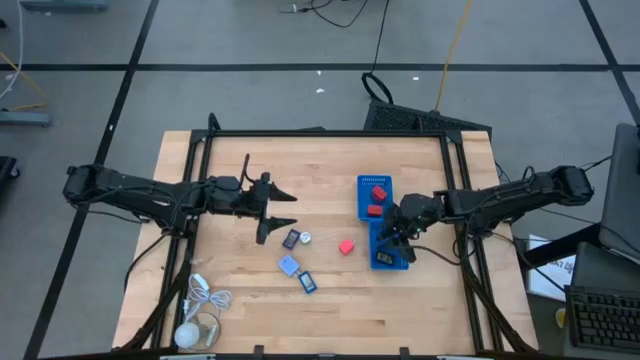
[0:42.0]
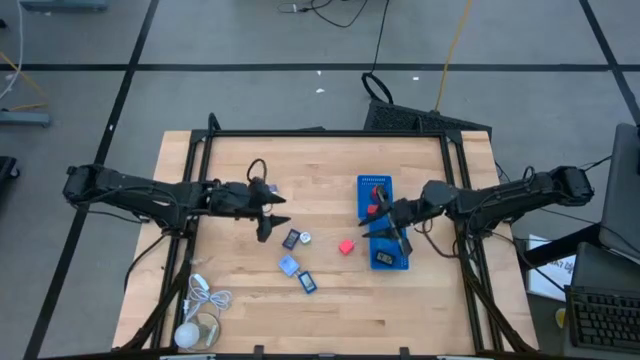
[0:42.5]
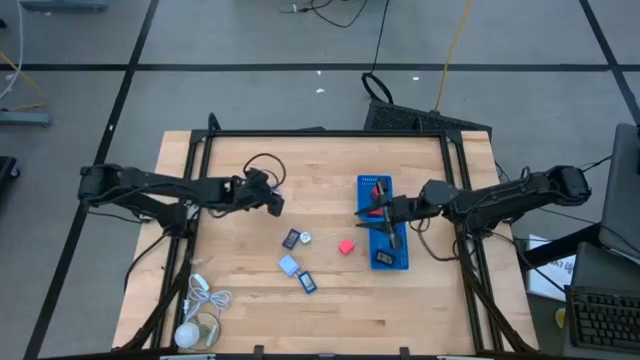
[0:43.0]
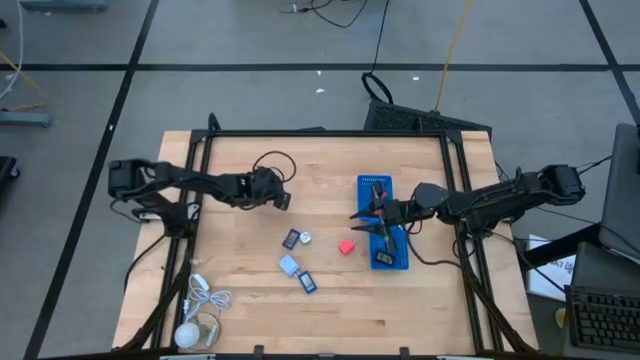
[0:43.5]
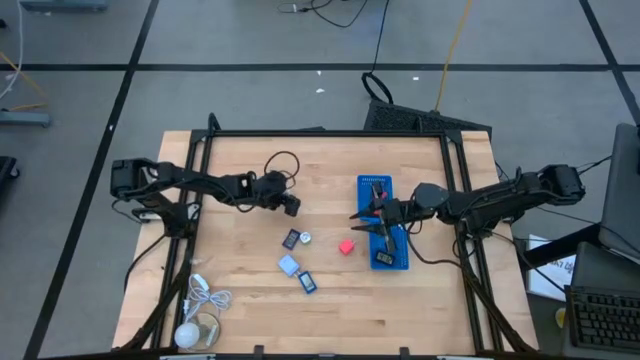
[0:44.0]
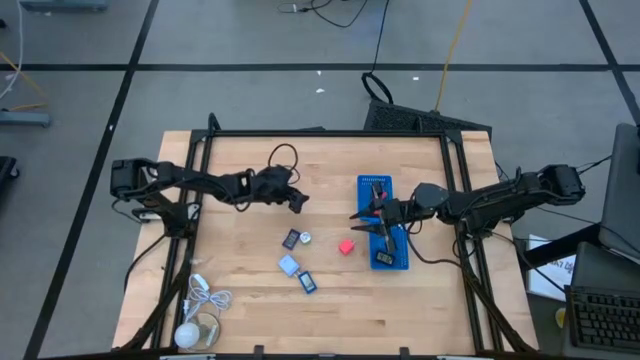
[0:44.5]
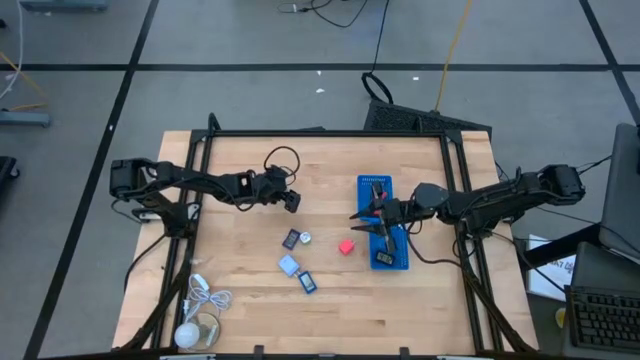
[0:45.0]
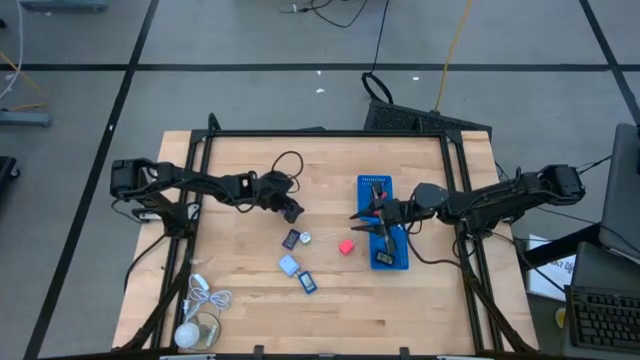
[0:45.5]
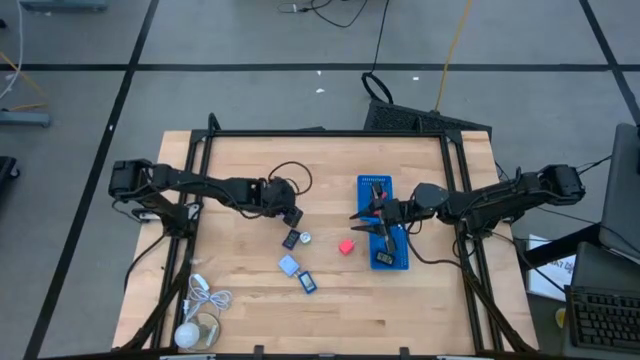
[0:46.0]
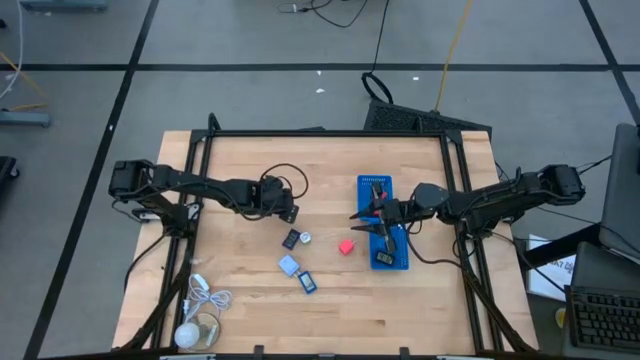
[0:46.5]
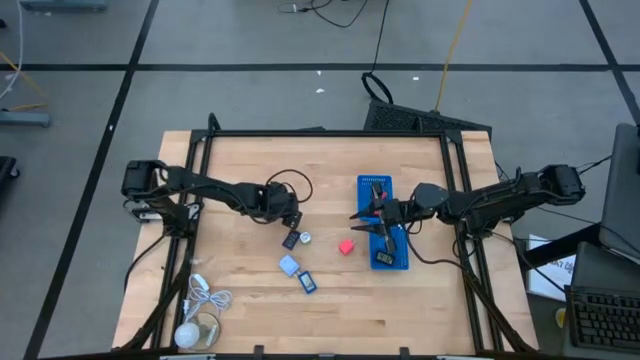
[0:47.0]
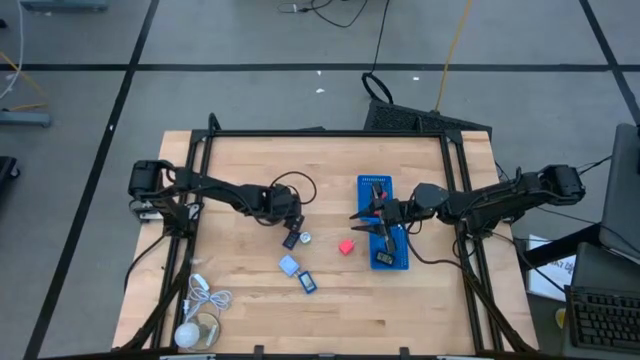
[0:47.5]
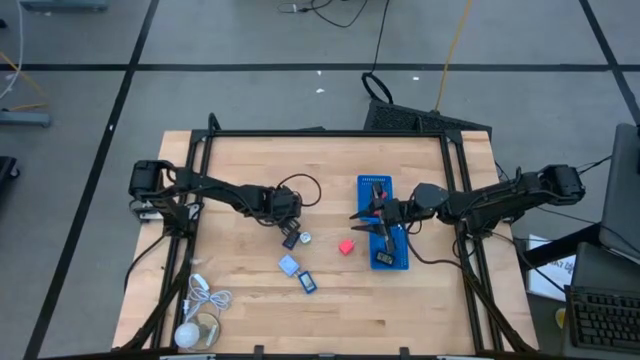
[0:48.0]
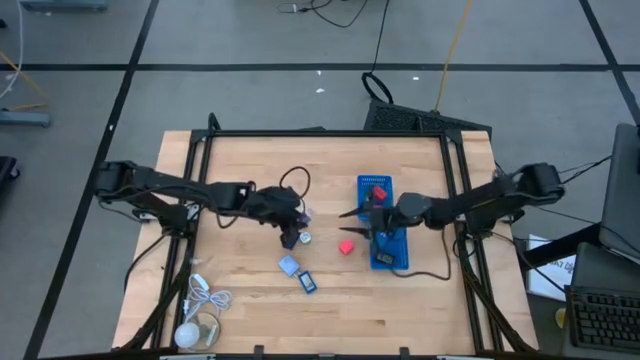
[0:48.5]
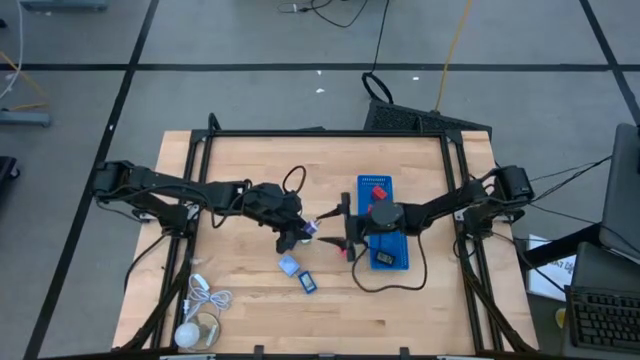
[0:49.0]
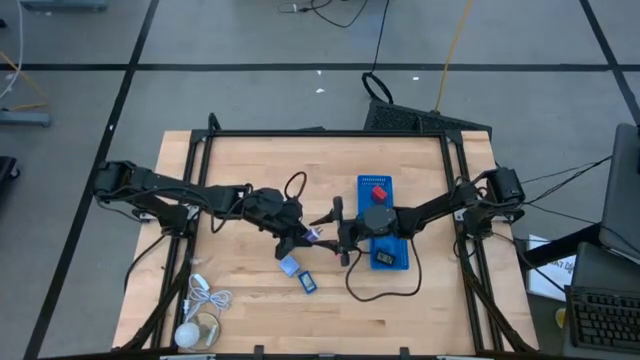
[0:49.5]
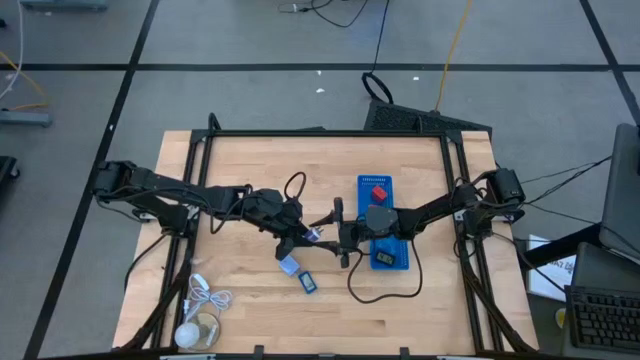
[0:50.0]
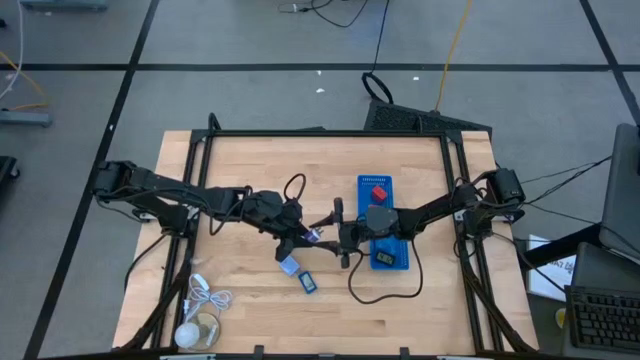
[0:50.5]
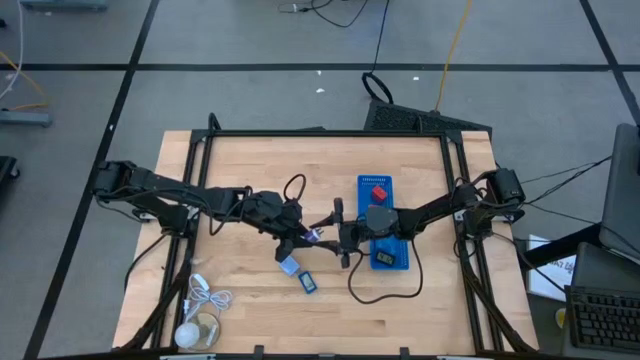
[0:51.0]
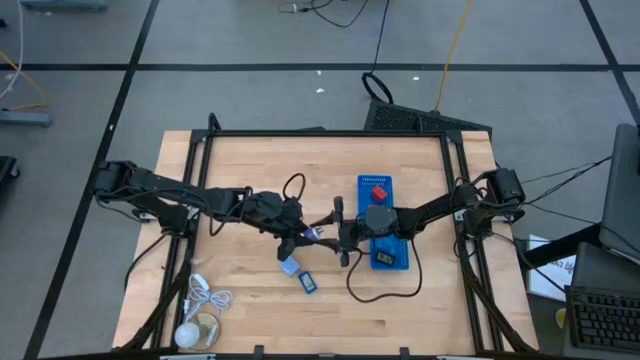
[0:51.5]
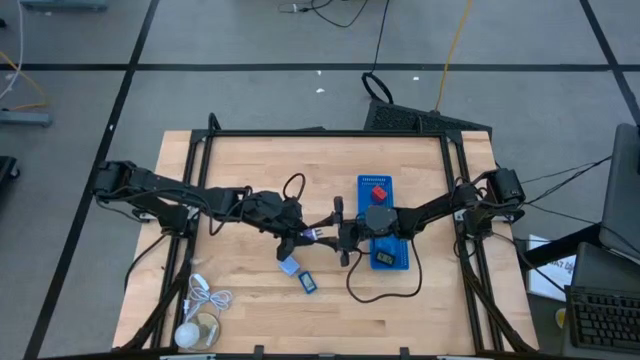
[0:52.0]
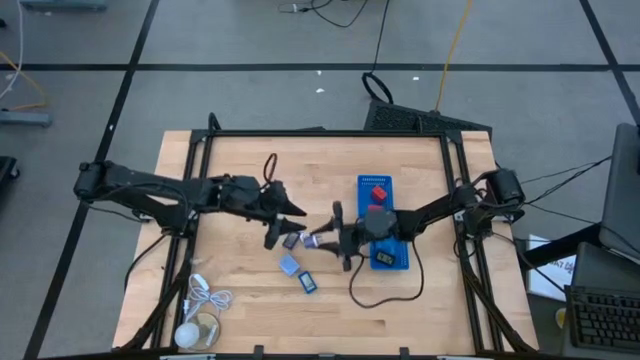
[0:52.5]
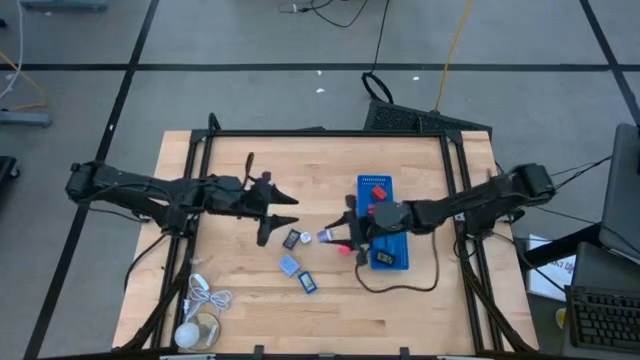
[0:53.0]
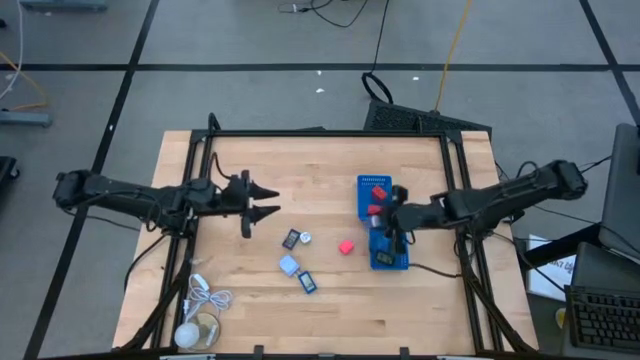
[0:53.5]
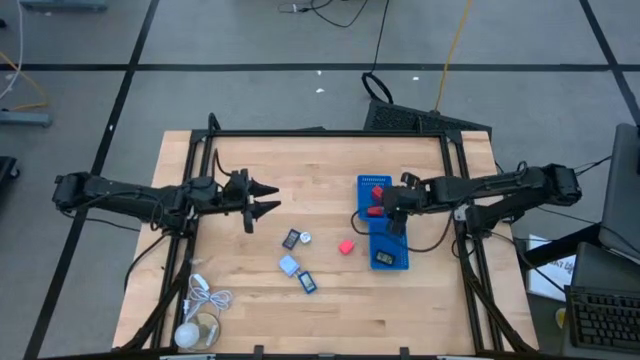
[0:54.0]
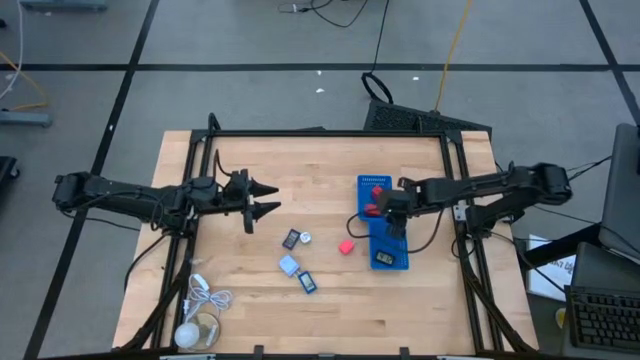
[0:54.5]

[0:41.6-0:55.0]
Task: Pick & Place Office items
Put the purple charger adapter into the top blue bin

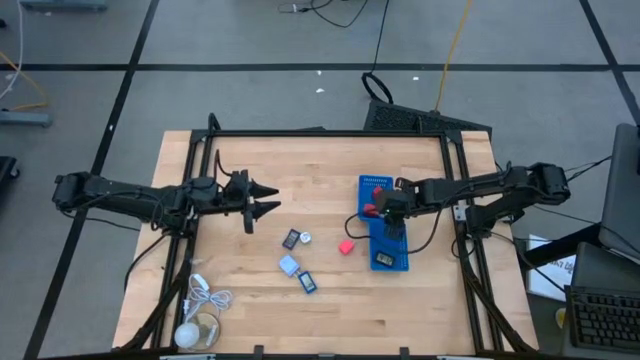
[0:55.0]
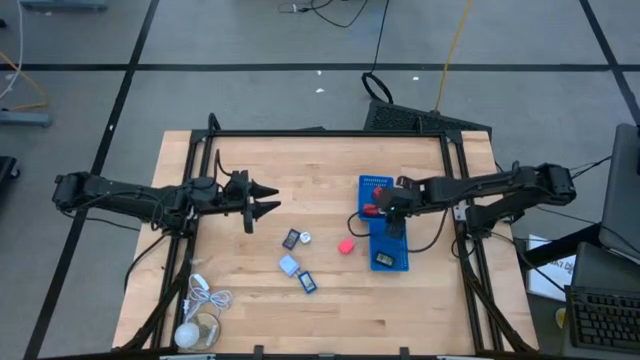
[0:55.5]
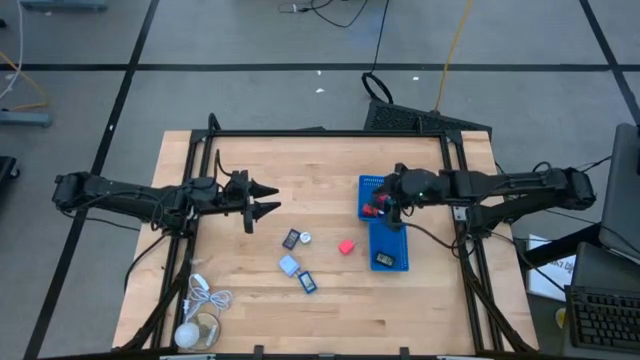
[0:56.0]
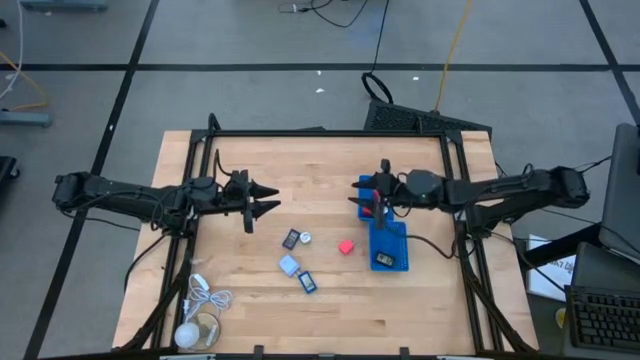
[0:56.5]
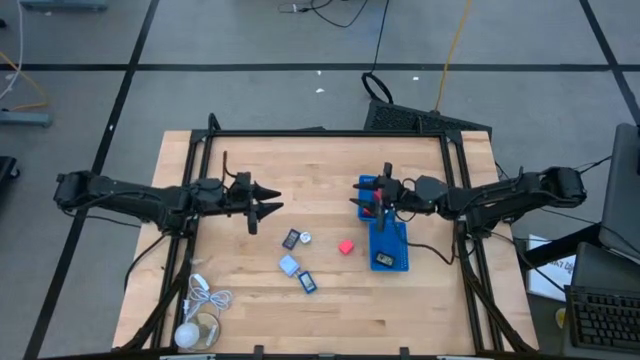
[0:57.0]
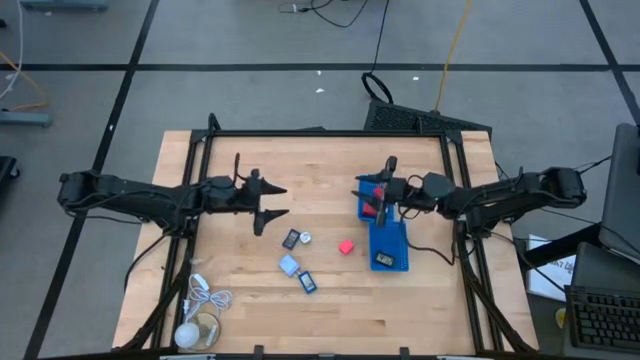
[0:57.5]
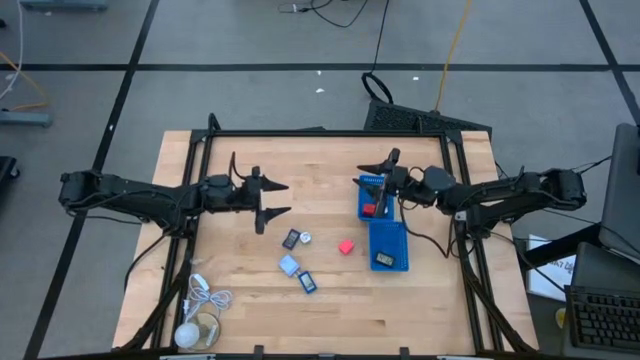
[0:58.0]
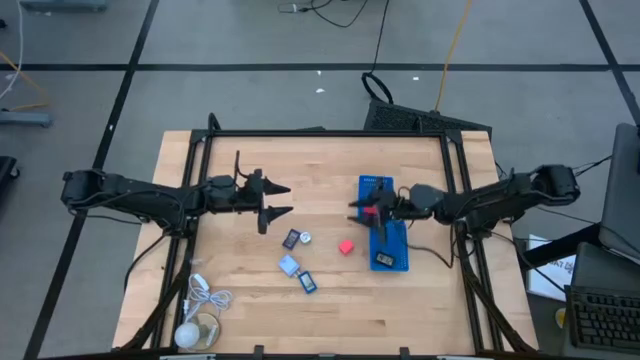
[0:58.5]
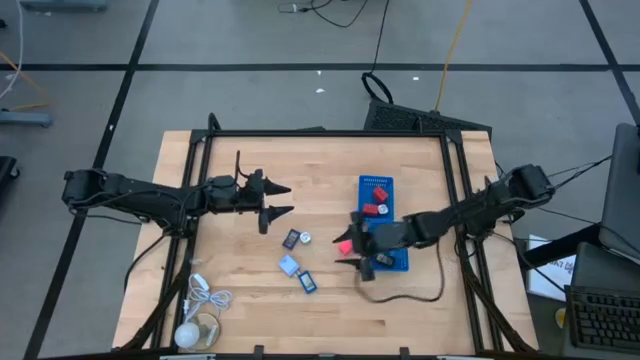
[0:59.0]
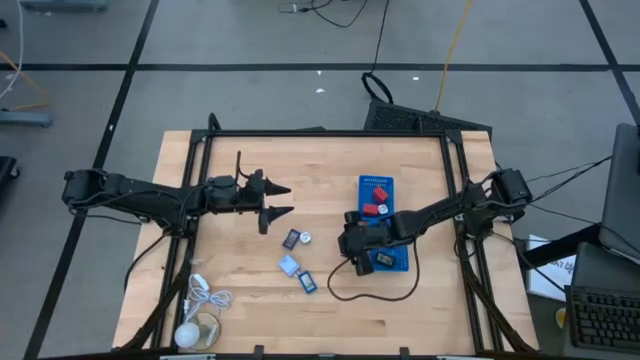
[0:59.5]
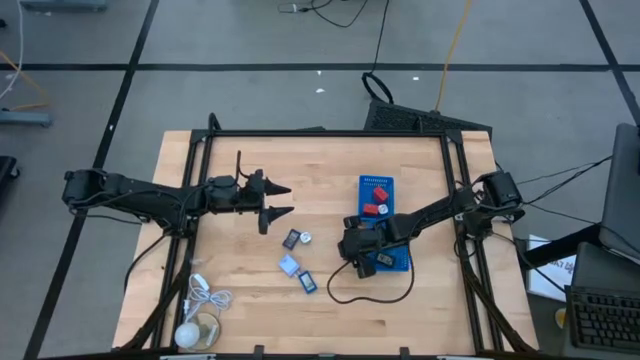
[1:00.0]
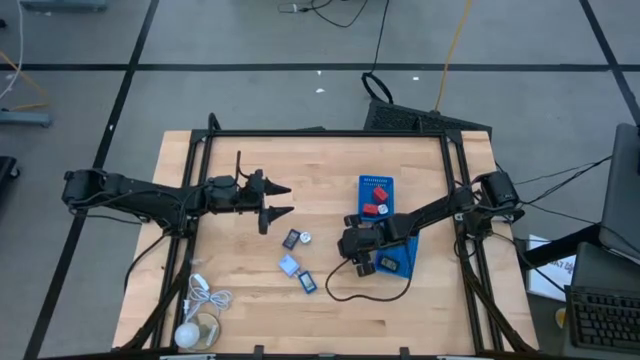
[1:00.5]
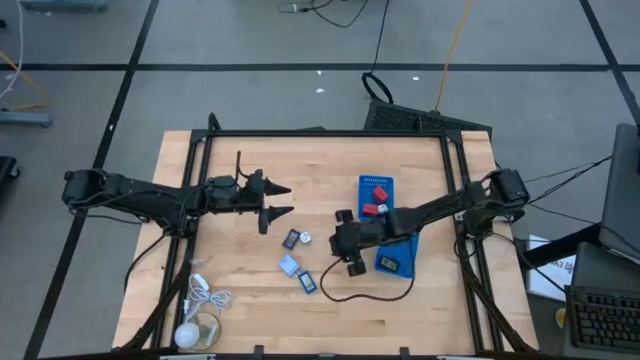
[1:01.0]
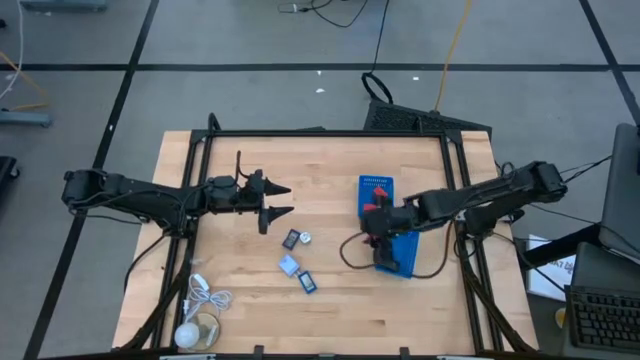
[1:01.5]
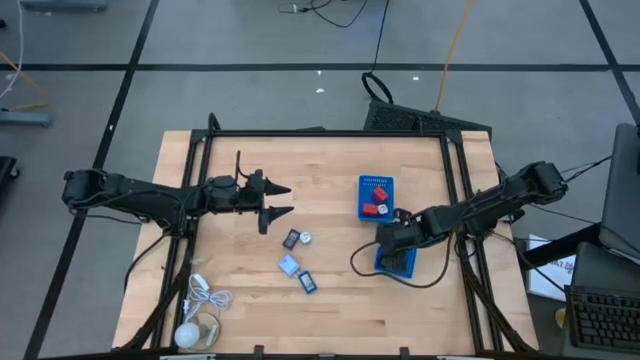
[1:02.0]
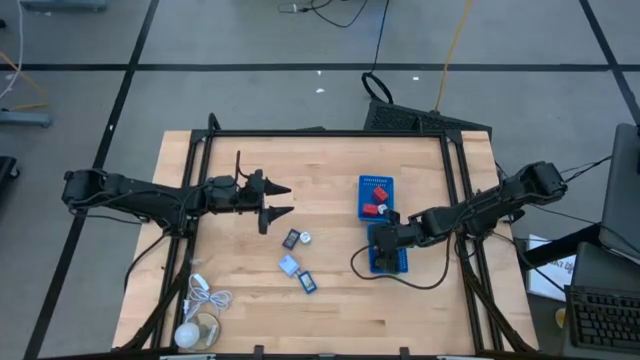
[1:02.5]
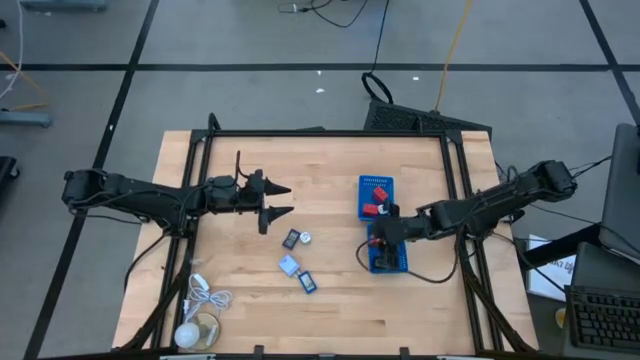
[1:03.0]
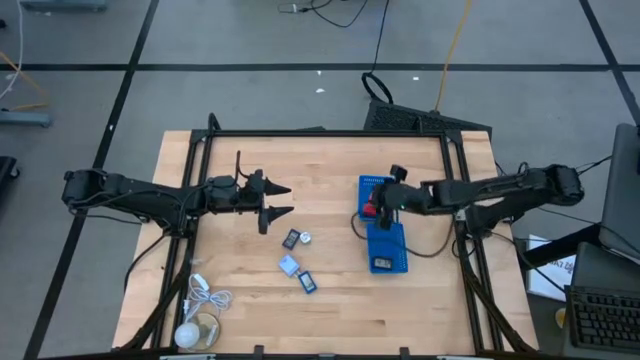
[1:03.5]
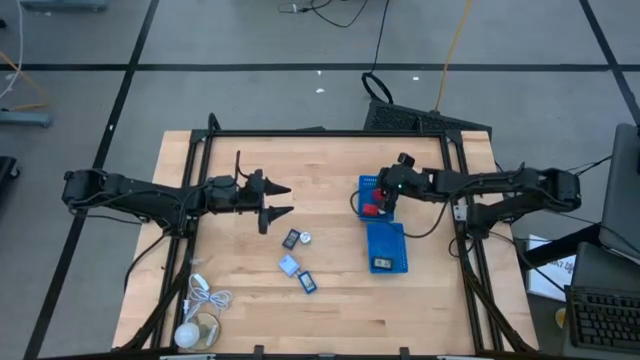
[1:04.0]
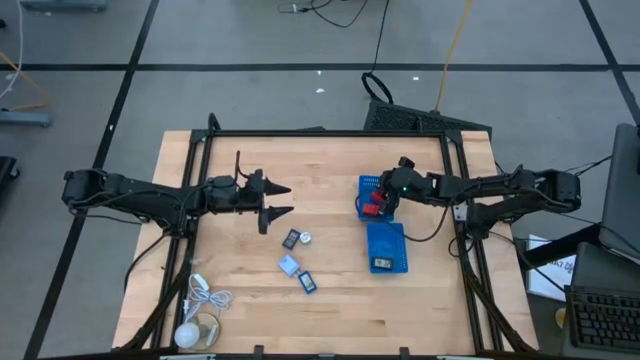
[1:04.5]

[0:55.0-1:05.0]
Put the pink charger adapter into the top blue bin
